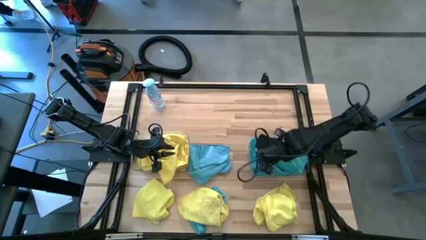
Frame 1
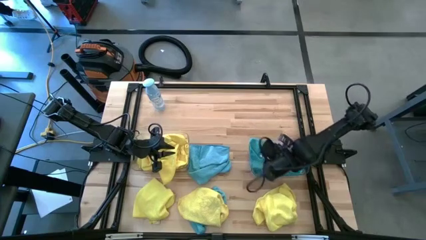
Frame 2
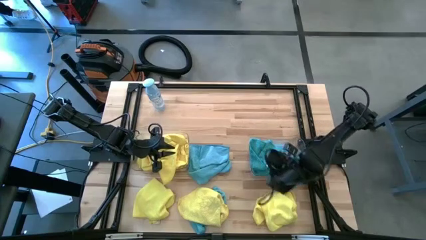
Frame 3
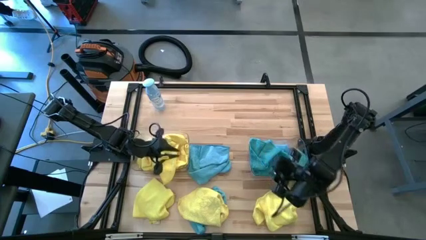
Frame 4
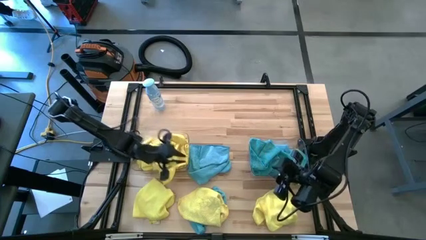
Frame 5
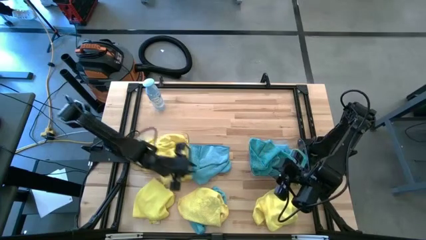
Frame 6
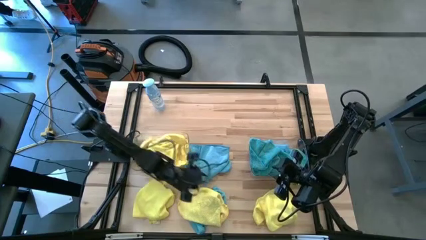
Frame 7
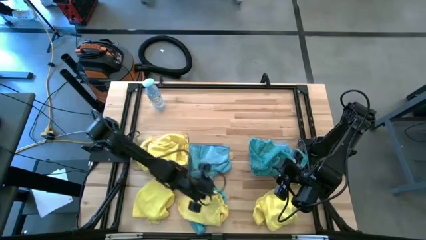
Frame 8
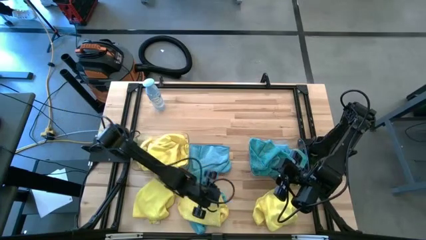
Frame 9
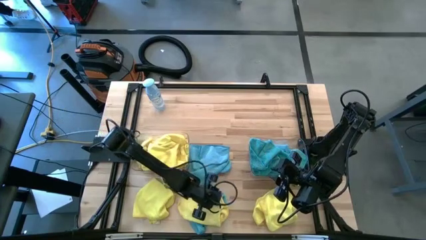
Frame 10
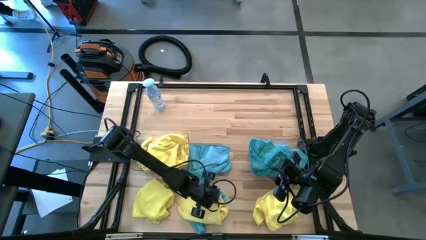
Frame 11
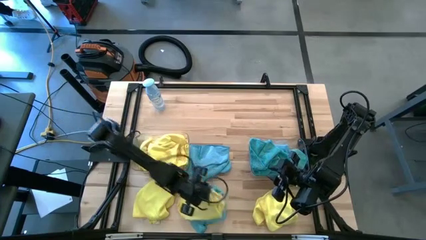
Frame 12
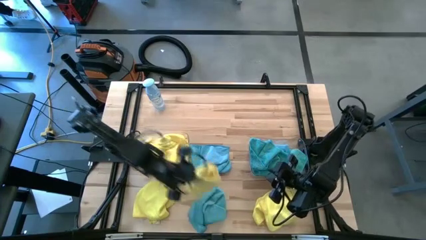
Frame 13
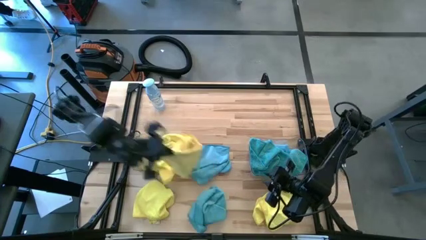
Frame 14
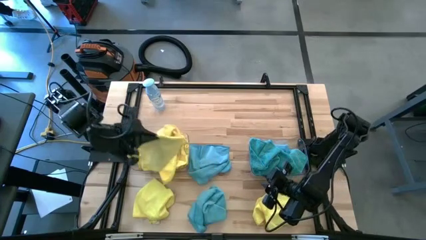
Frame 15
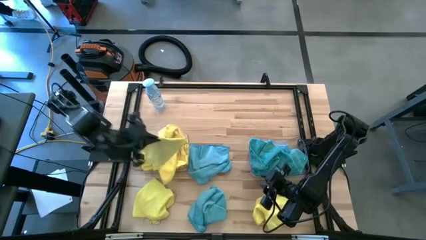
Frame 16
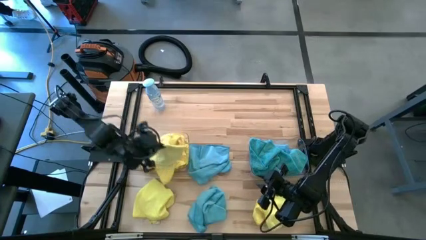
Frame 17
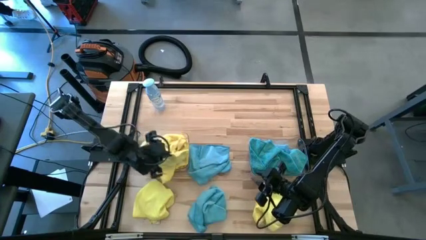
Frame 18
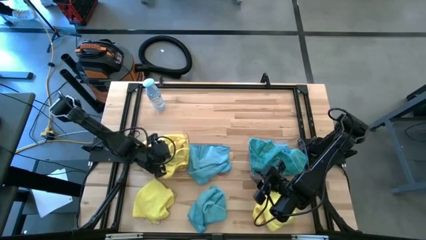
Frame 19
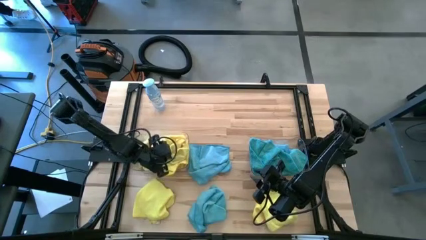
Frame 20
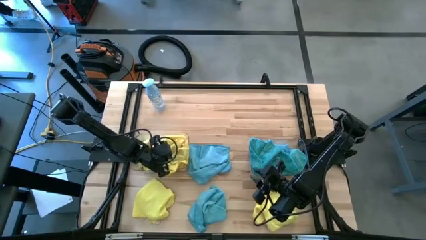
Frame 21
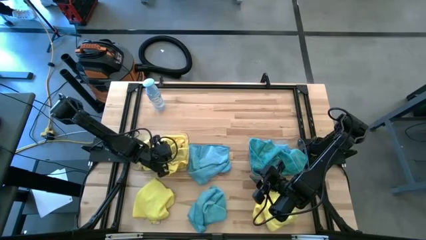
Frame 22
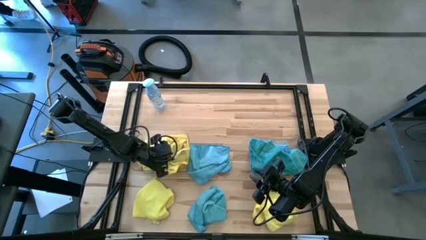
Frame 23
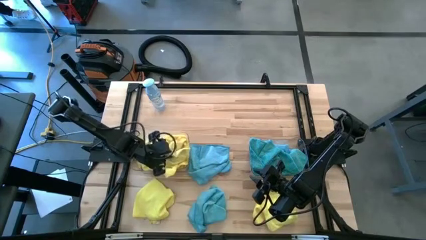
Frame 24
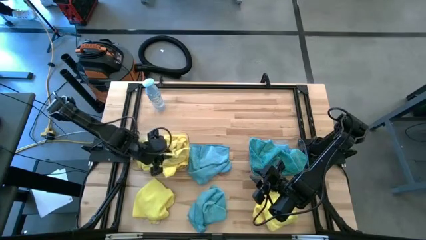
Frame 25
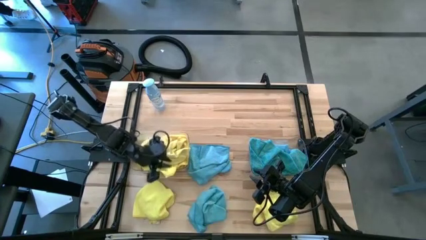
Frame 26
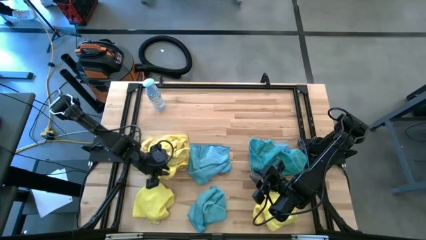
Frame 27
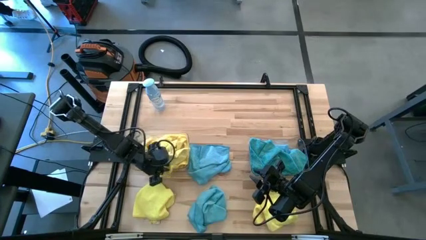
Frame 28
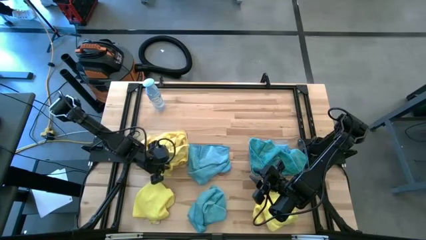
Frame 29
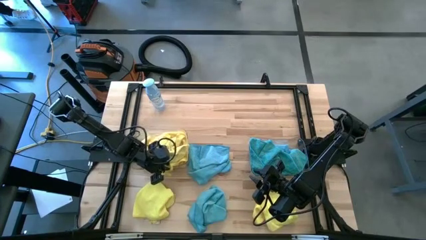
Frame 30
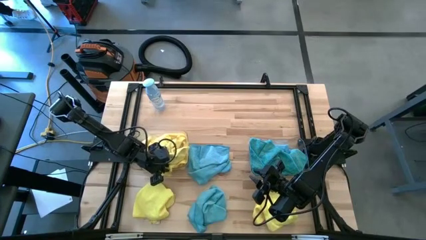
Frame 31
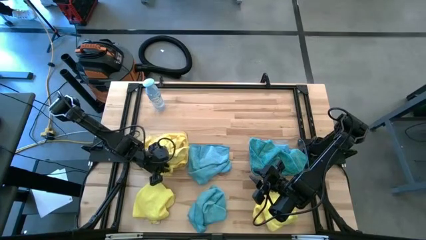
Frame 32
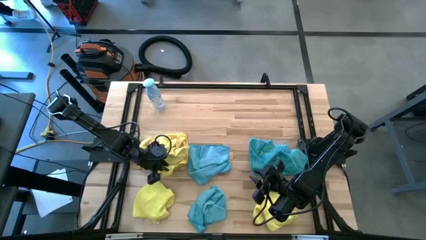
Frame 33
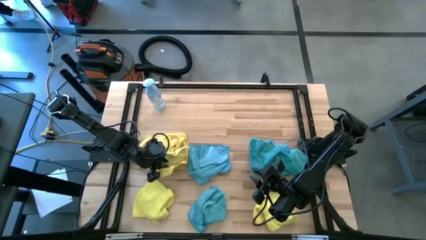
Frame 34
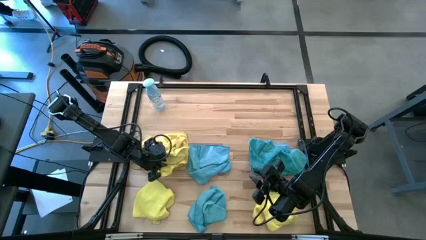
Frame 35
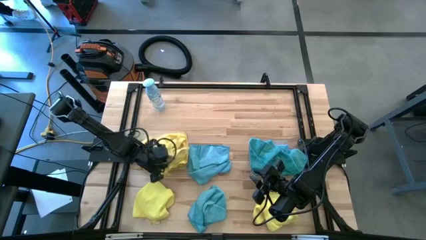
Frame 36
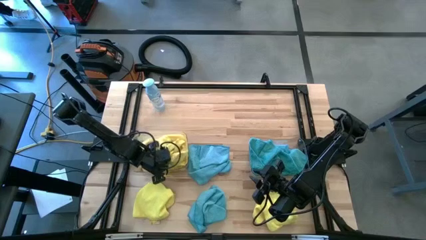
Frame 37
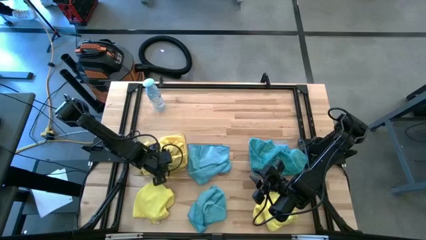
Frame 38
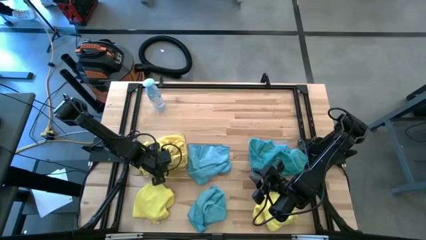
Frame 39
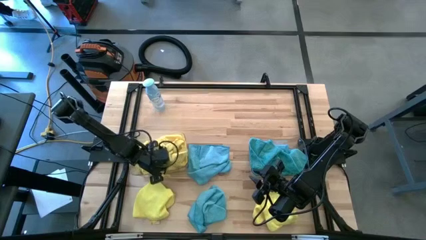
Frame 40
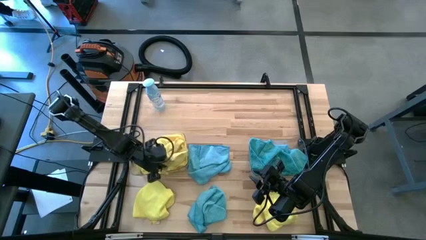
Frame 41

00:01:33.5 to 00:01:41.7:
Task: Sort microfiber towel by color & place in baskets
Put the bottom middle yellow microfiber cloth into the left transparent bin

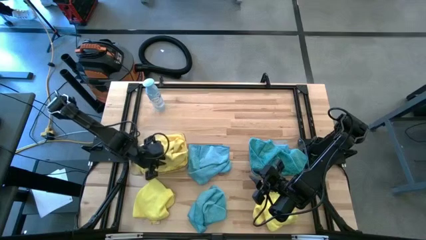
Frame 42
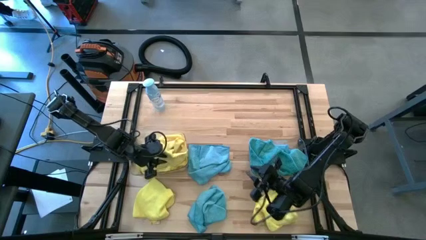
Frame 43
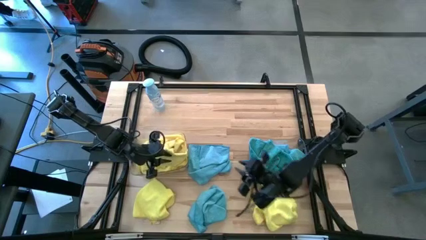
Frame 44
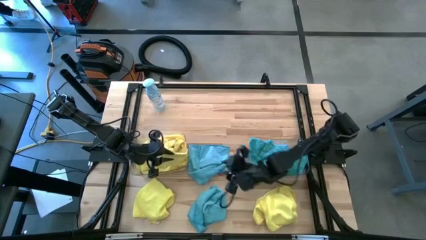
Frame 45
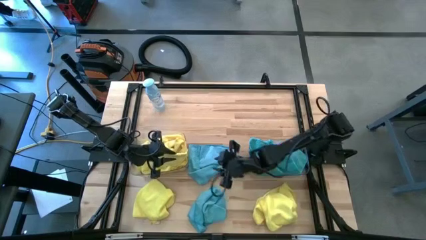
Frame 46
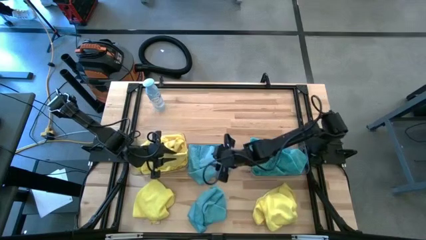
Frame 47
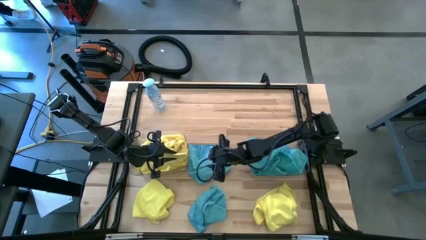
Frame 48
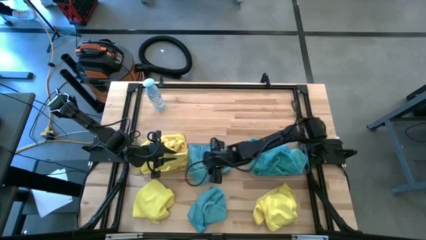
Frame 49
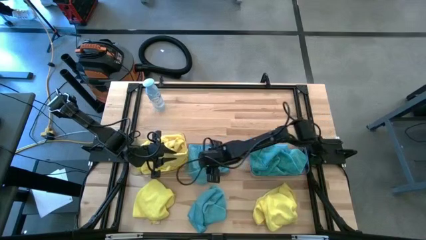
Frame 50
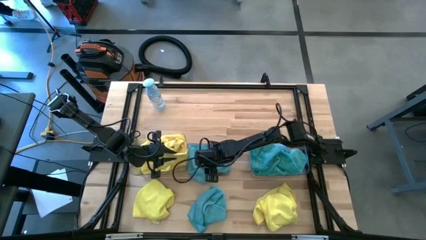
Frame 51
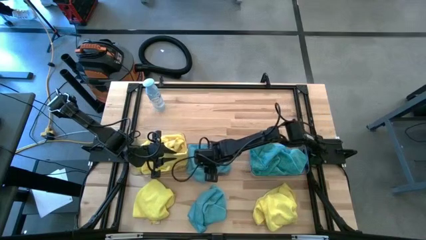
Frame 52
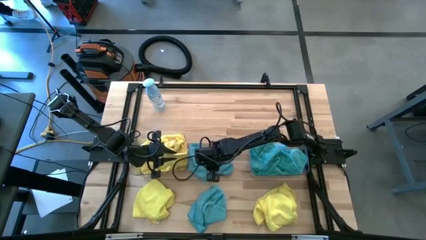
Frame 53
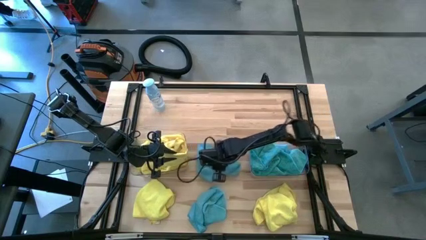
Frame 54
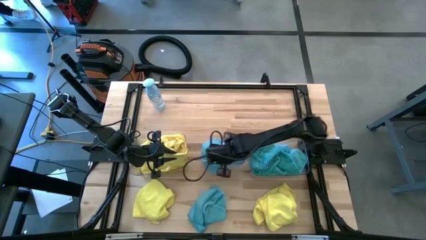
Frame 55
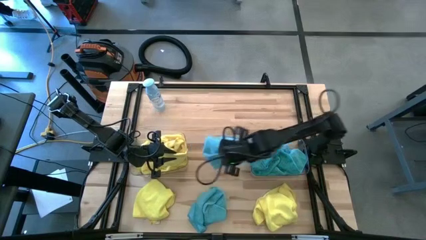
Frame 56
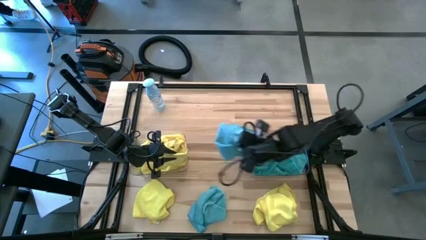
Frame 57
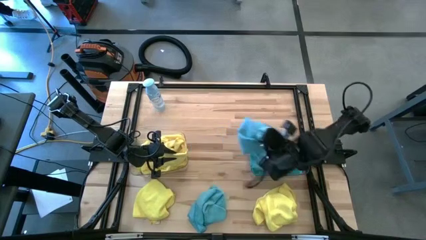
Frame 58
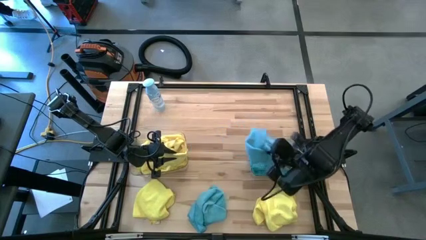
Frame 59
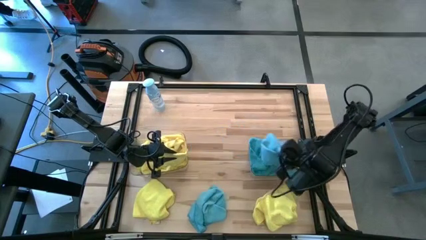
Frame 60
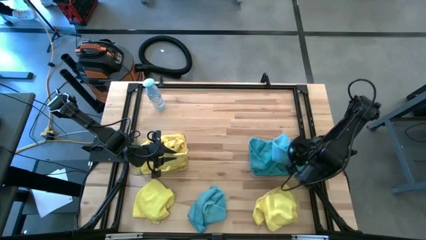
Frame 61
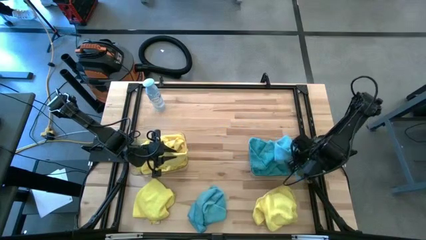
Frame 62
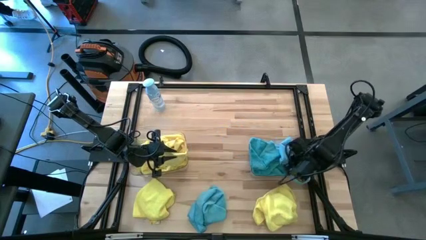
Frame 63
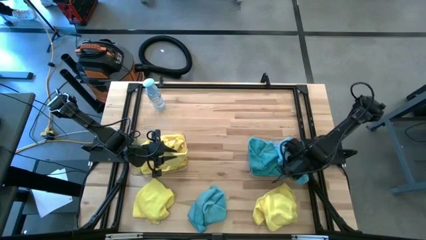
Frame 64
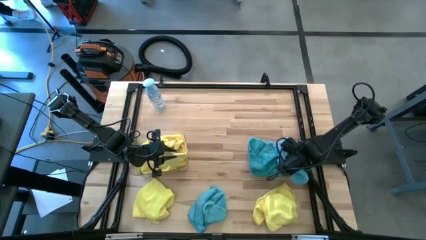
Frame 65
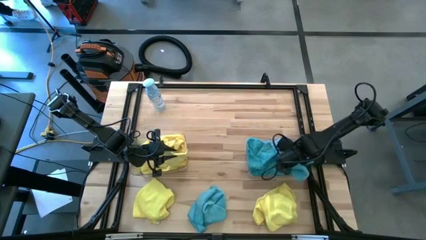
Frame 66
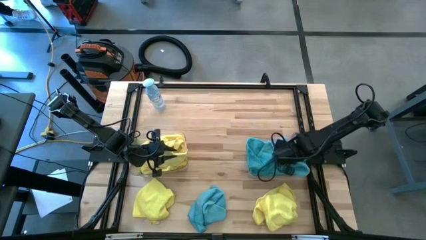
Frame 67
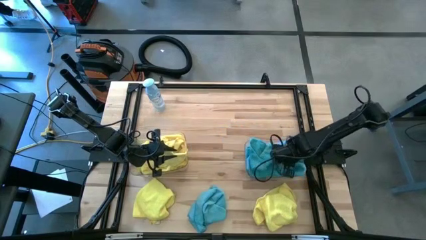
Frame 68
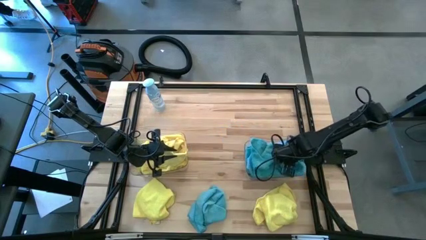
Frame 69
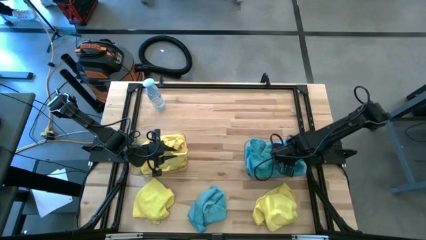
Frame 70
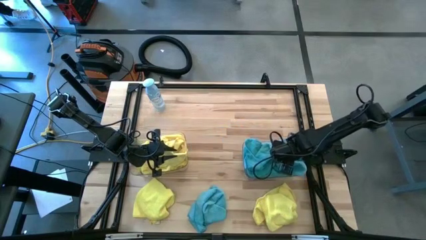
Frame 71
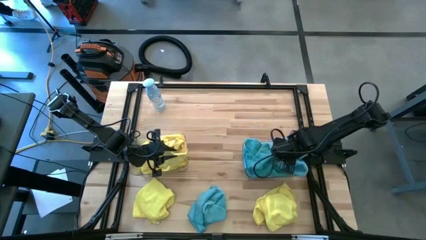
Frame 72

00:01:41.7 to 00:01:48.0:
Put the top blue microfiber cloth into the right transparent bin
